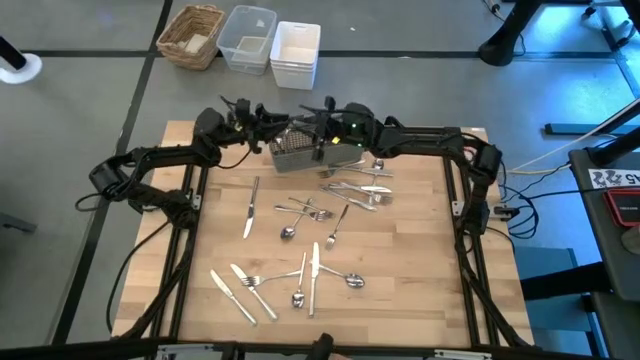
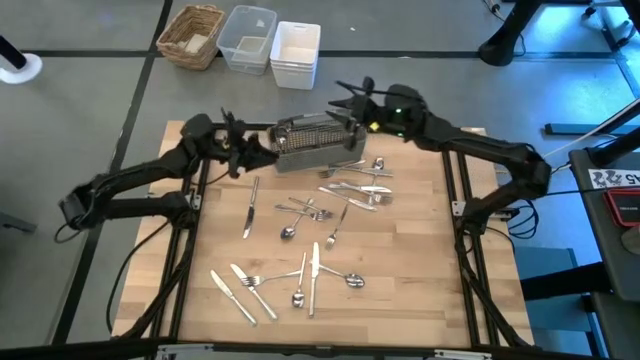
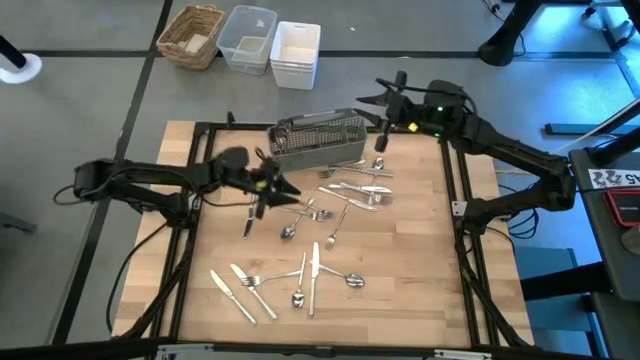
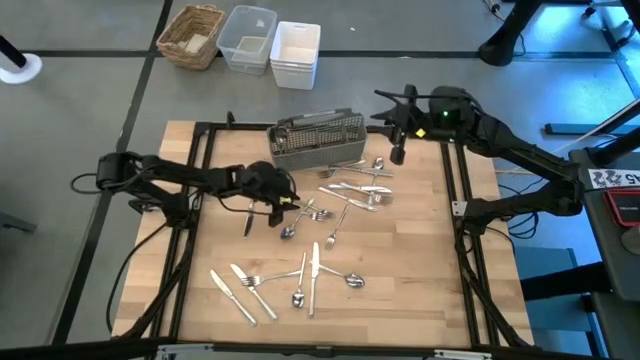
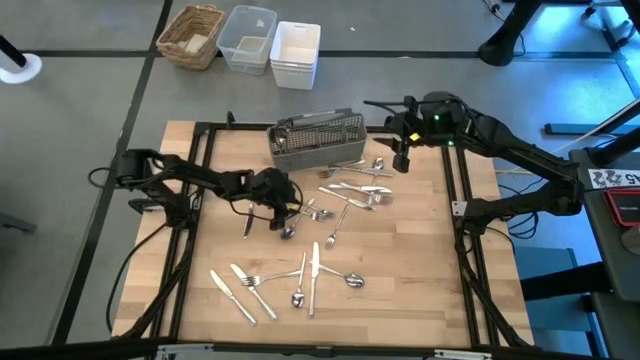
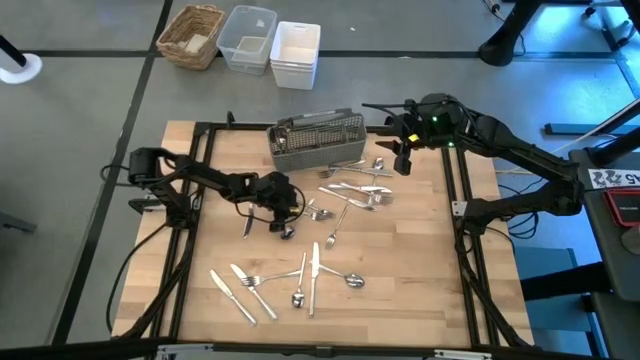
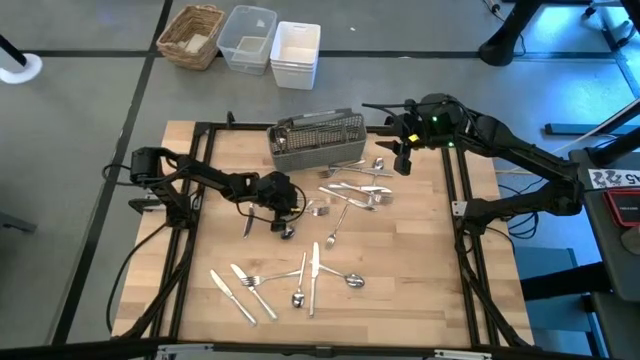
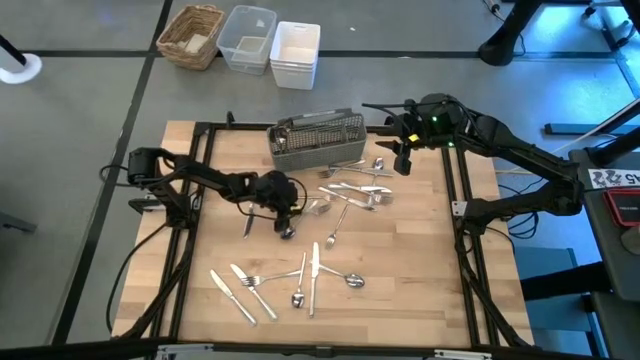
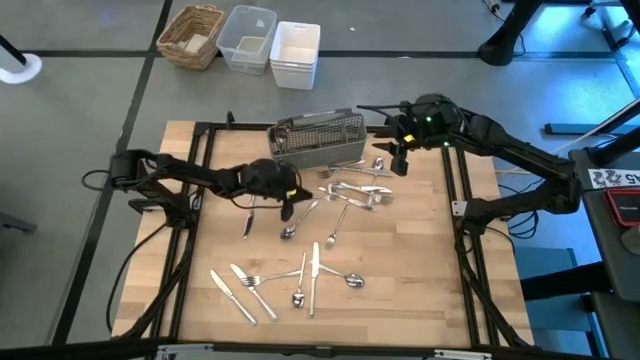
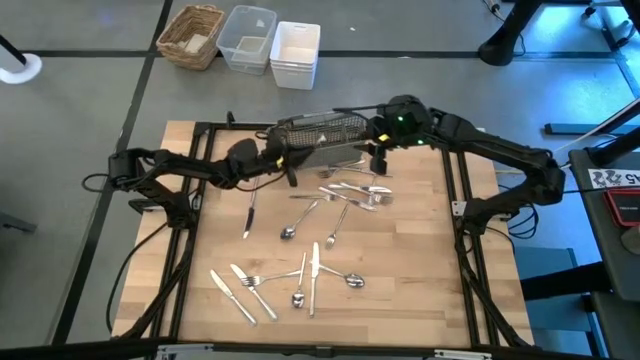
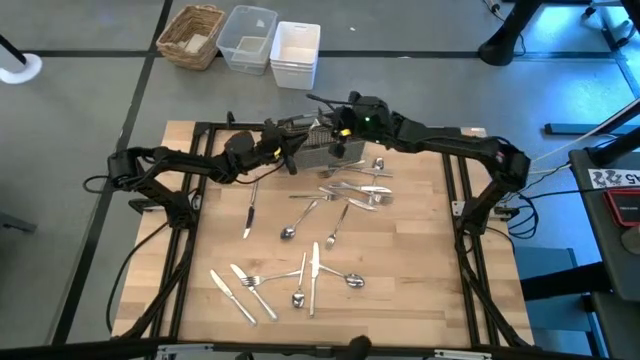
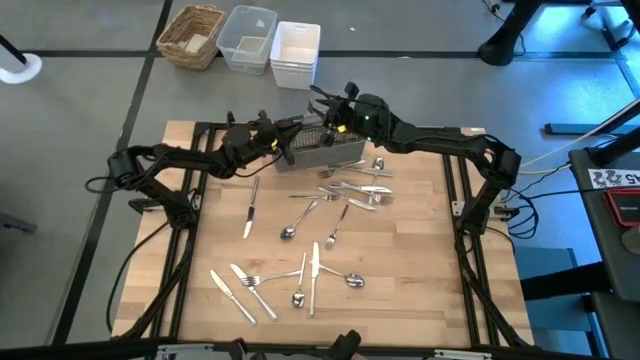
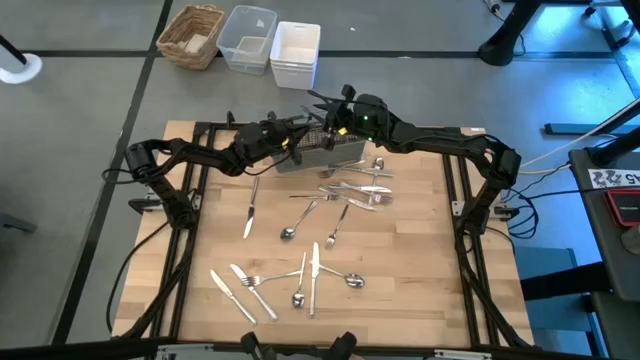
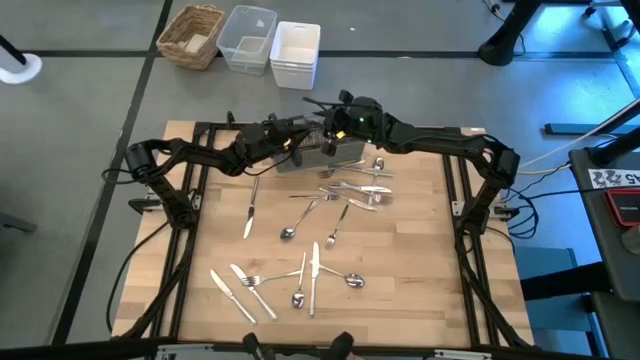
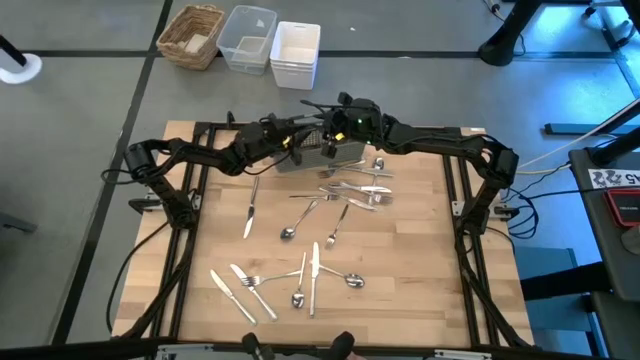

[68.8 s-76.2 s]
Task: Sort silverware
Put the silver fork into the silverware rack

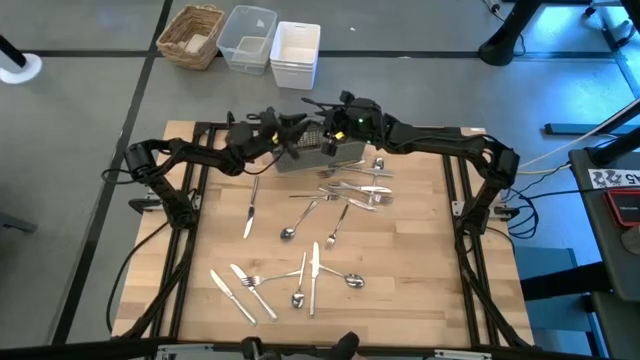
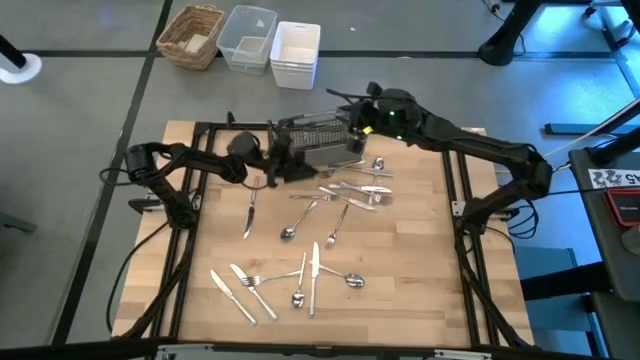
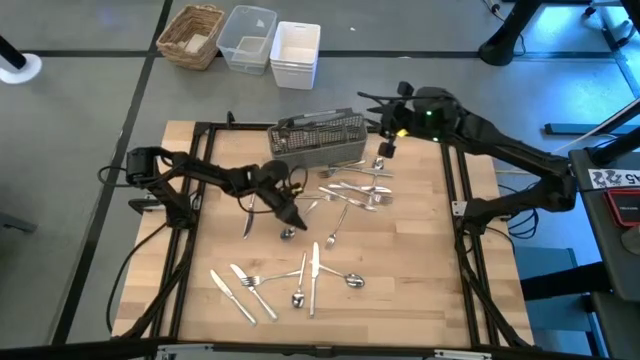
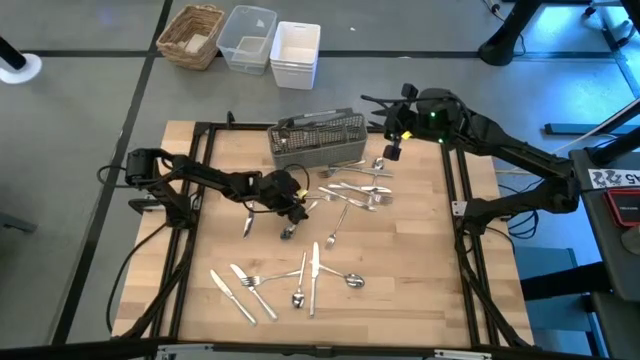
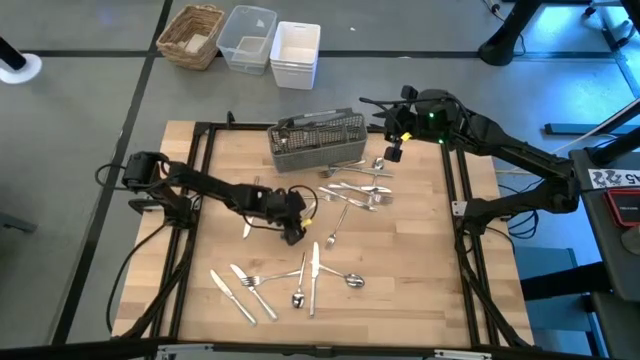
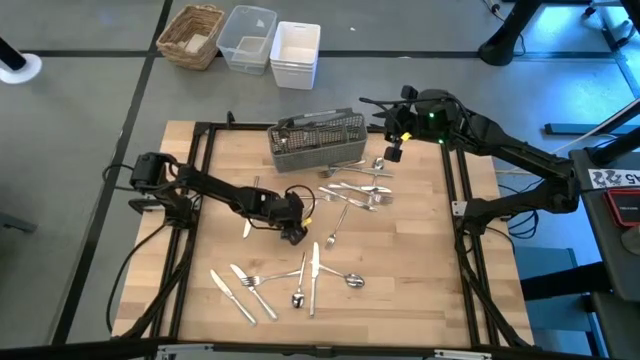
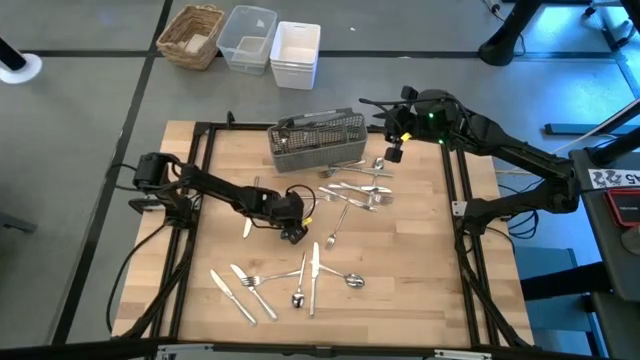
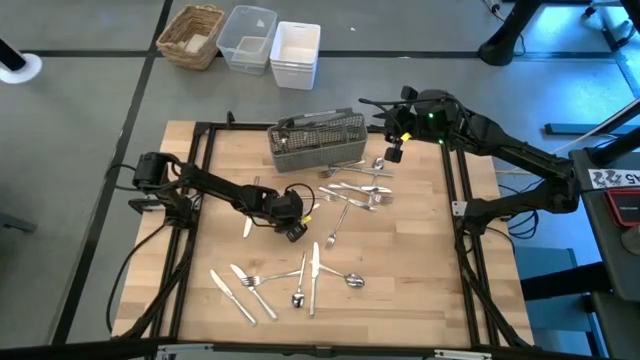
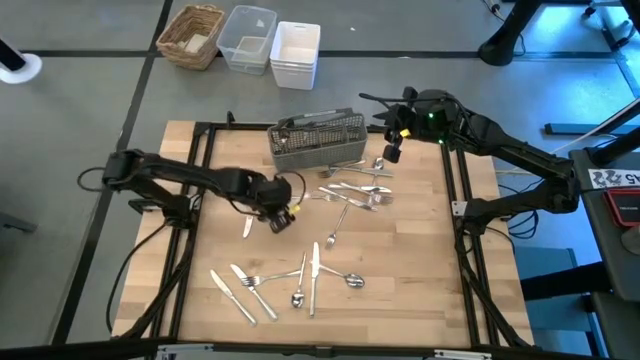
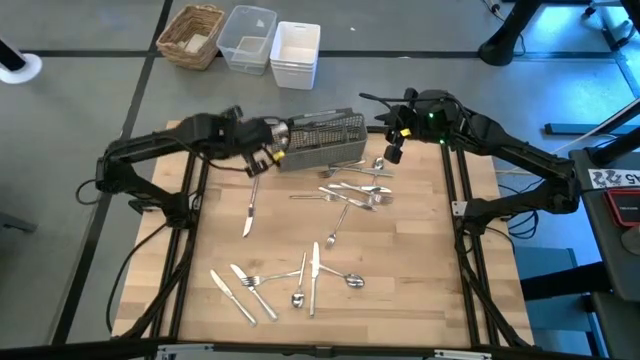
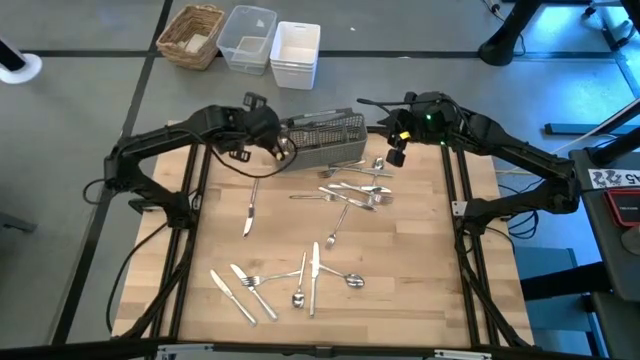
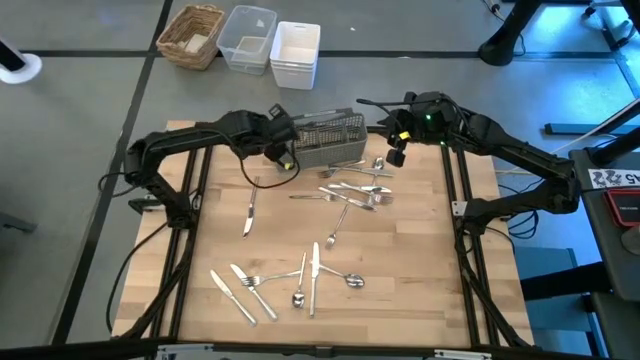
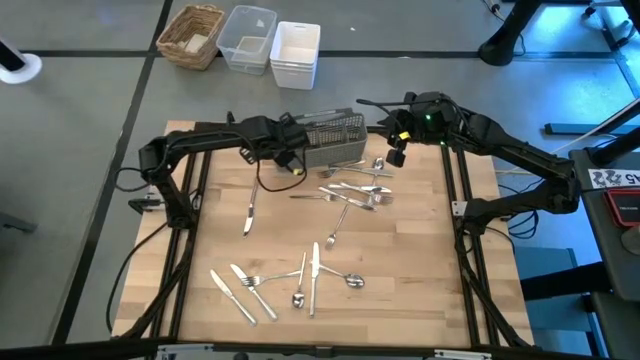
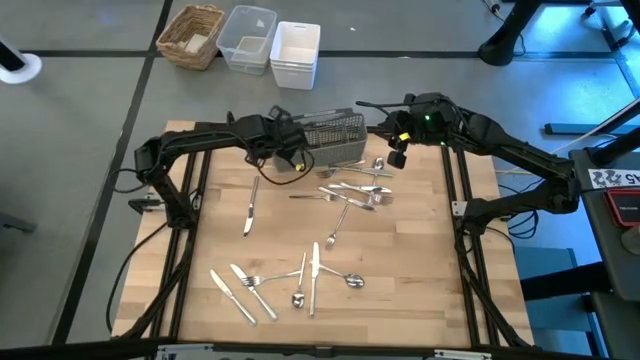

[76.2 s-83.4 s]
Put the silver spoon into the silverware rack

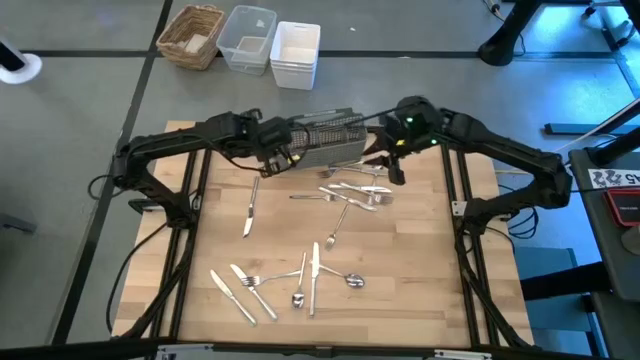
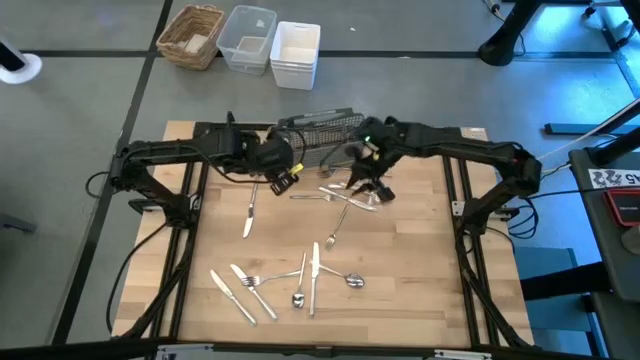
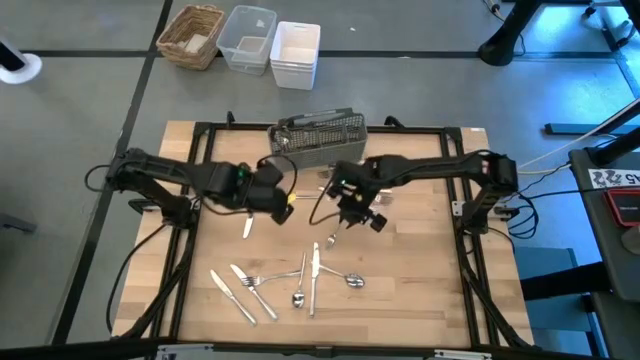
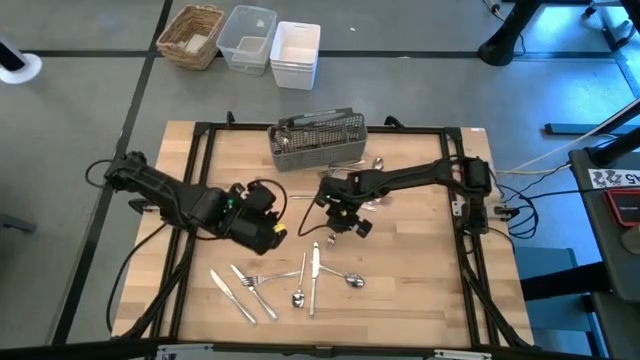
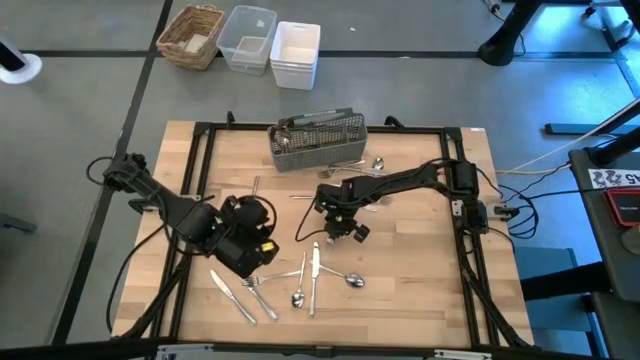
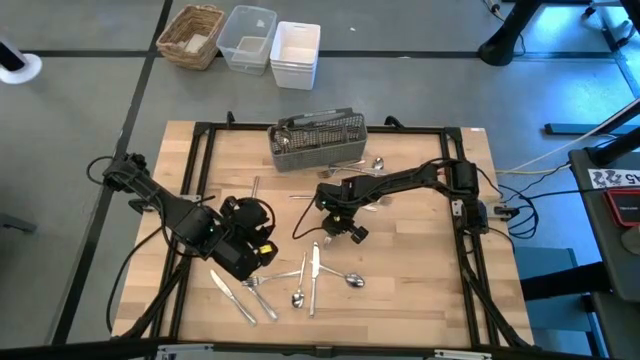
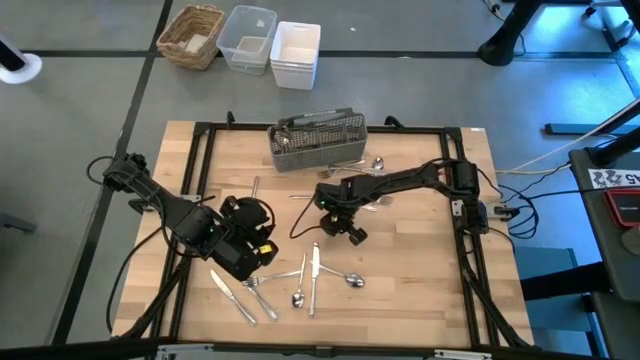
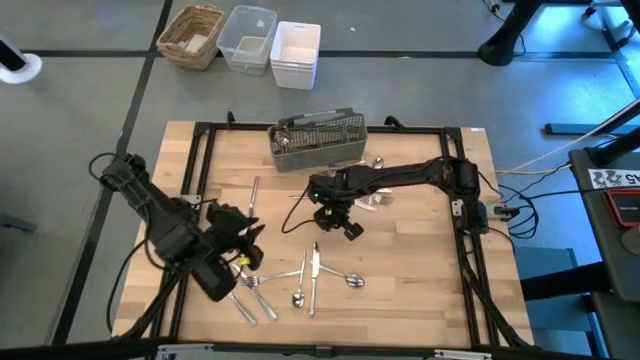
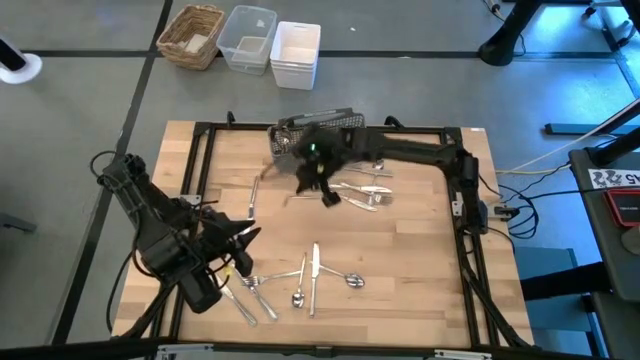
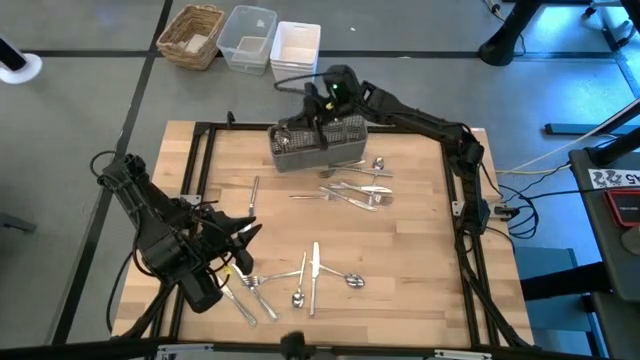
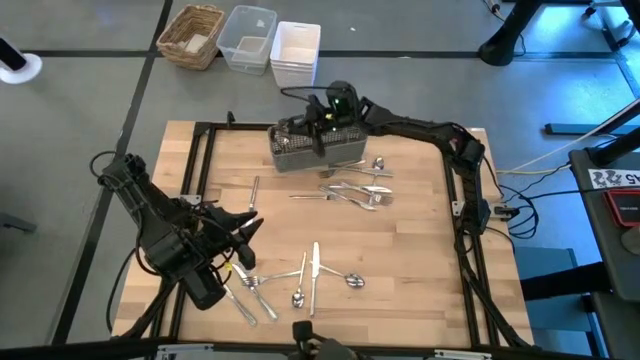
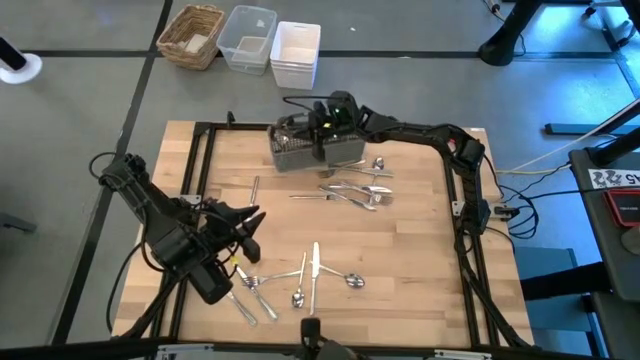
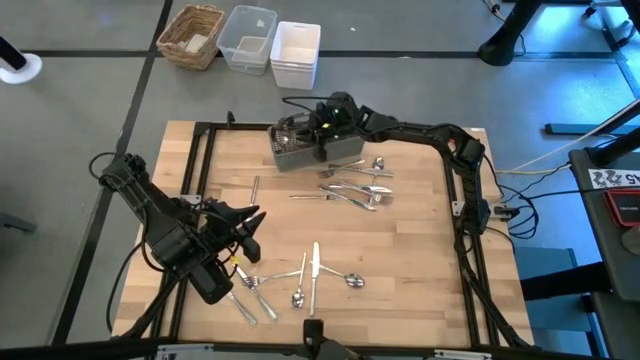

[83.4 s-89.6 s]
Put the silver fork into the silverware rack

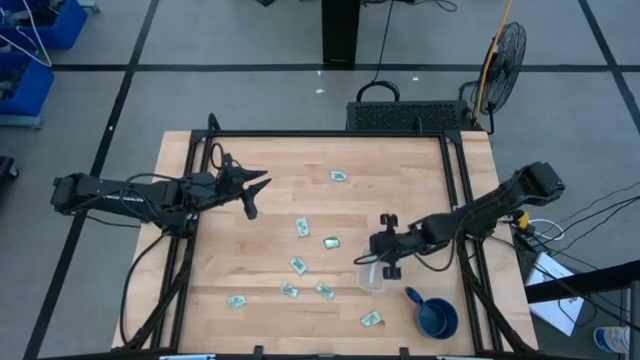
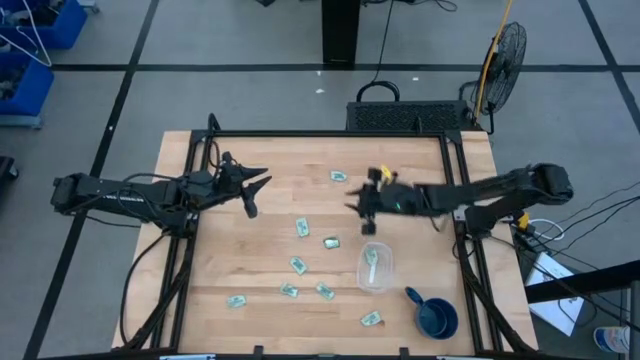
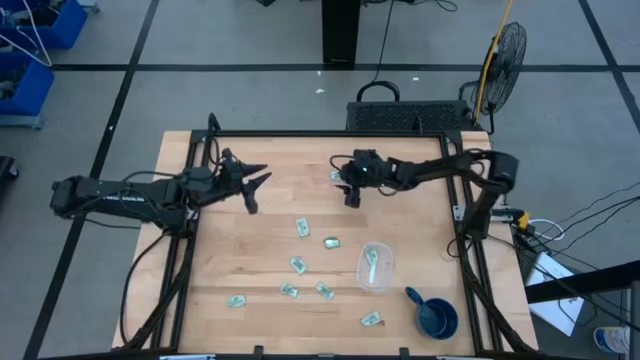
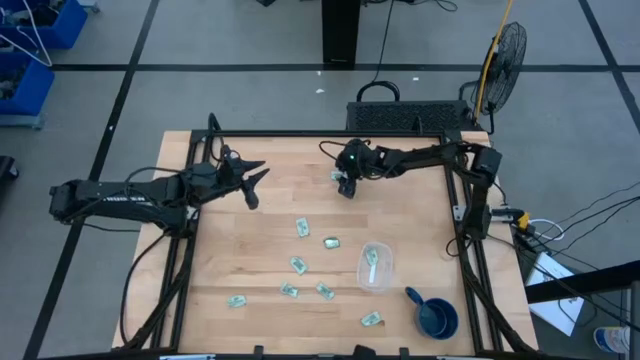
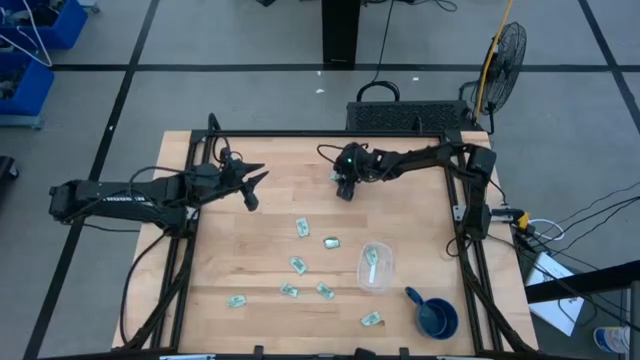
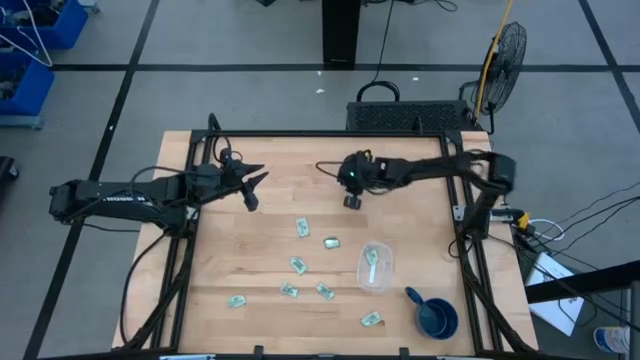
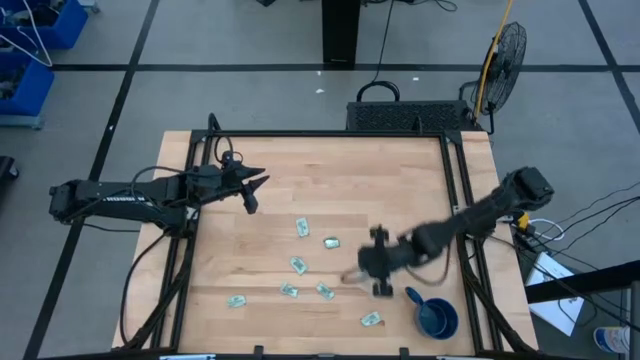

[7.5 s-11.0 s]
Task: Pick and place Stevia / Truvia into bins
Put the stevia packet into the transparent container
